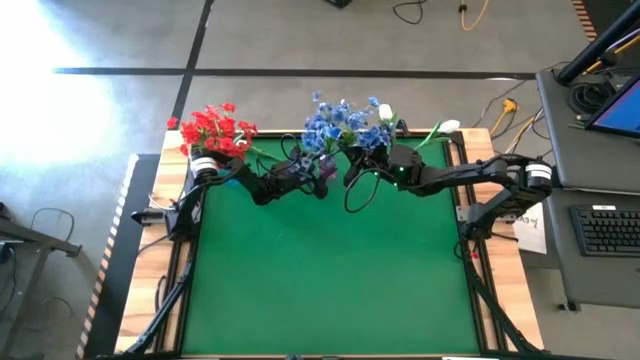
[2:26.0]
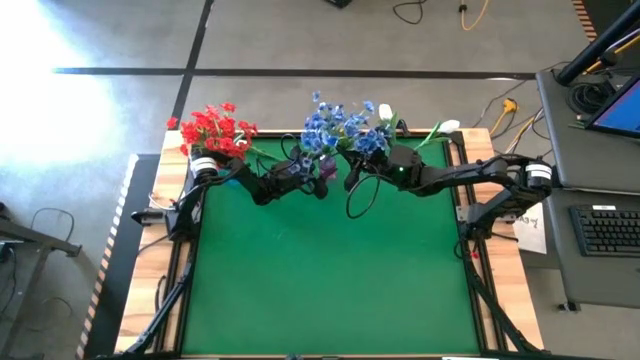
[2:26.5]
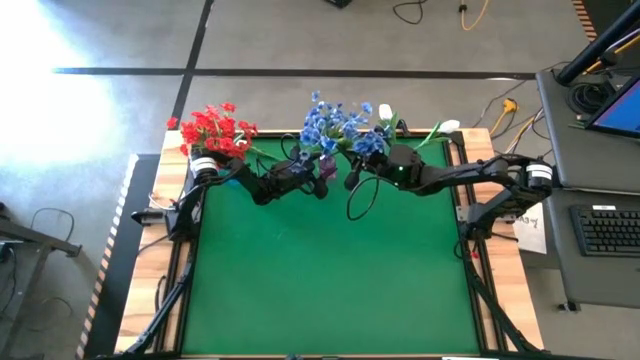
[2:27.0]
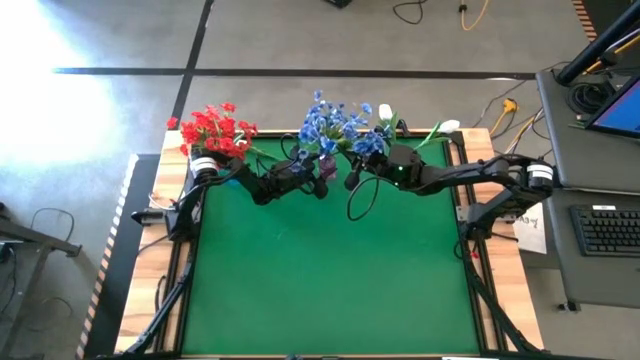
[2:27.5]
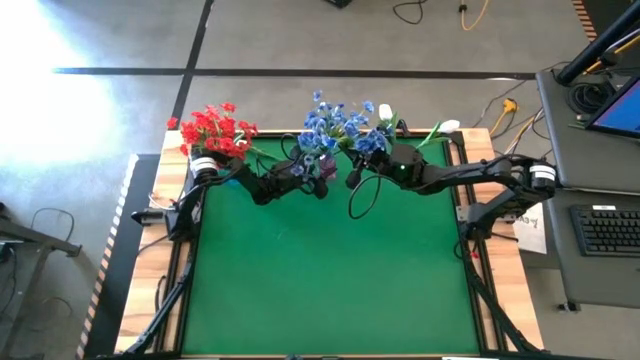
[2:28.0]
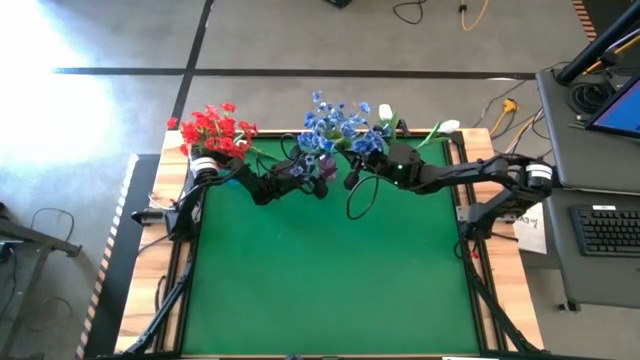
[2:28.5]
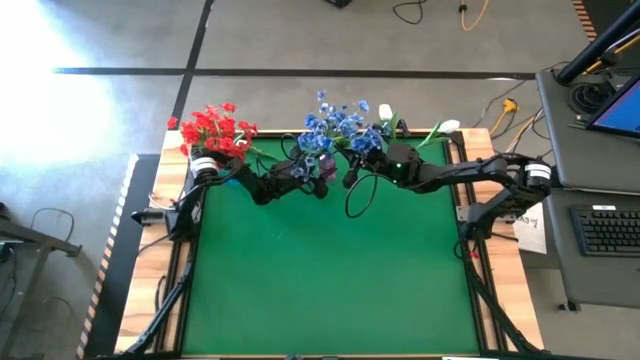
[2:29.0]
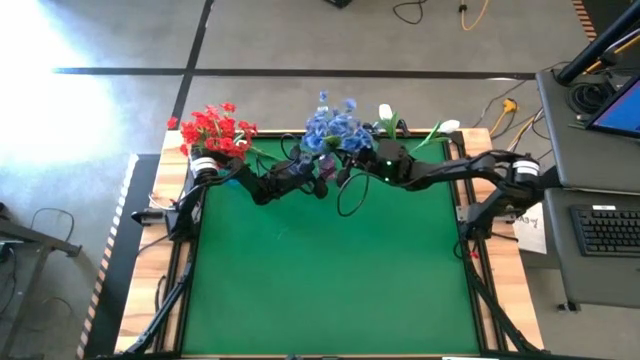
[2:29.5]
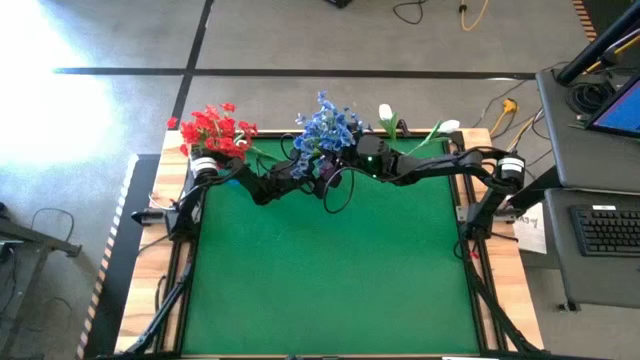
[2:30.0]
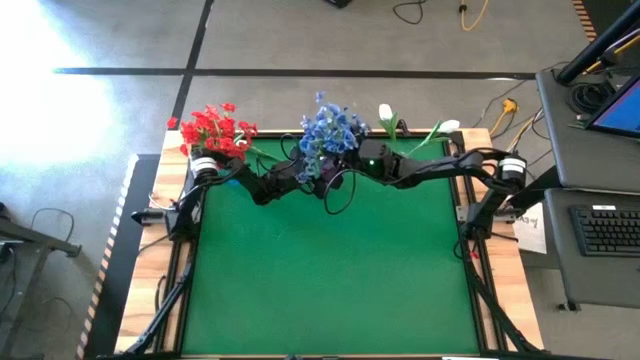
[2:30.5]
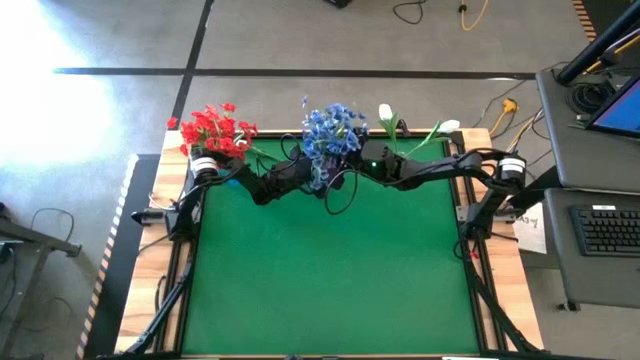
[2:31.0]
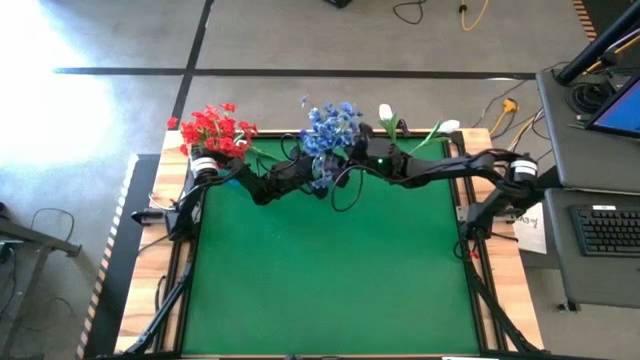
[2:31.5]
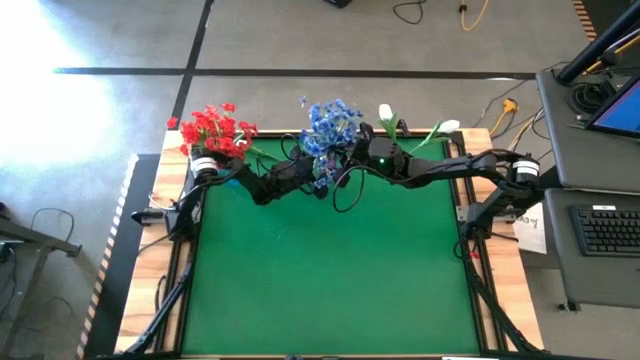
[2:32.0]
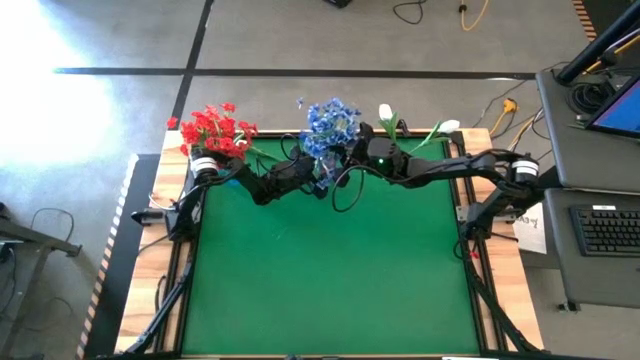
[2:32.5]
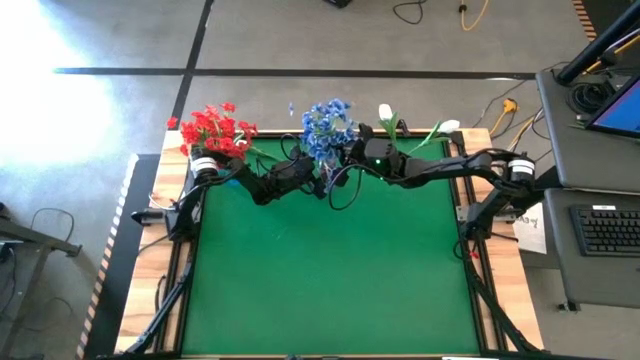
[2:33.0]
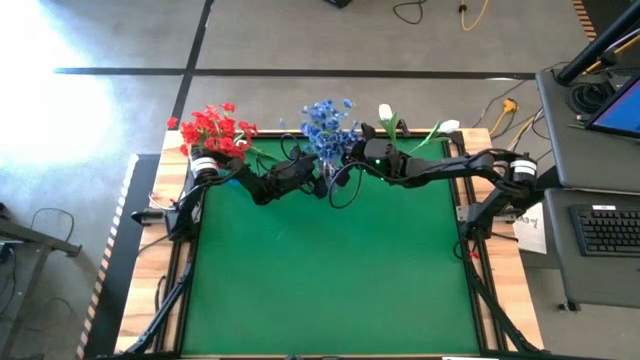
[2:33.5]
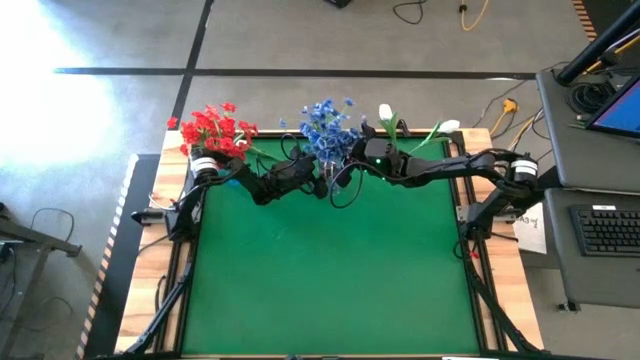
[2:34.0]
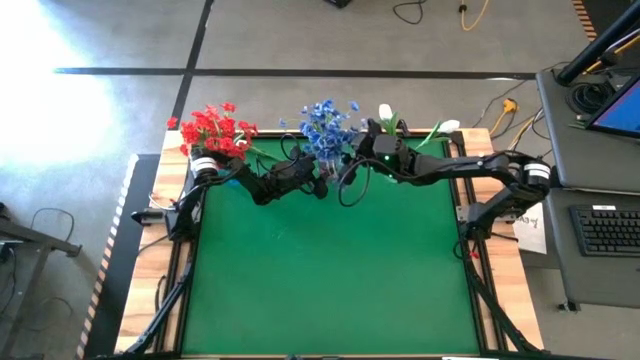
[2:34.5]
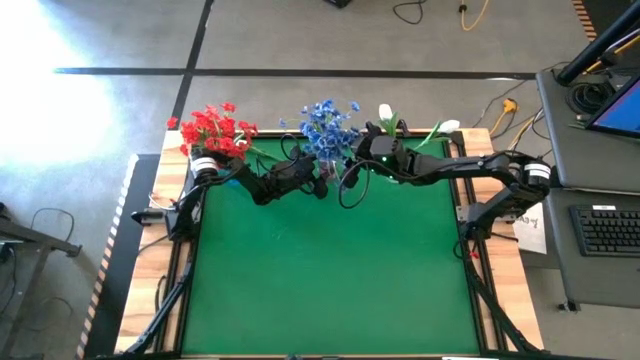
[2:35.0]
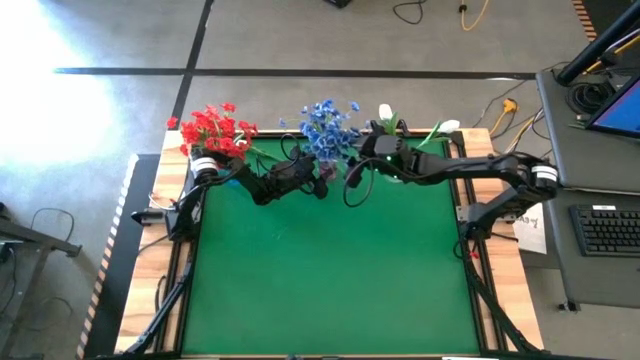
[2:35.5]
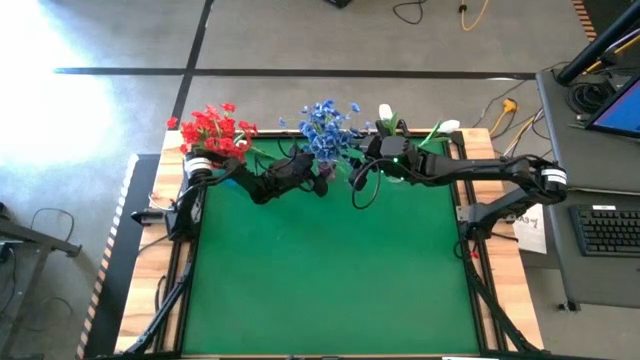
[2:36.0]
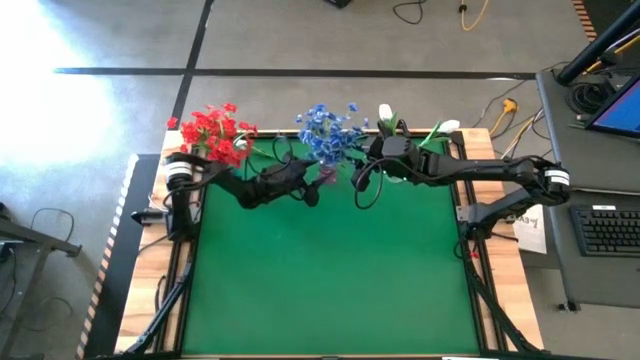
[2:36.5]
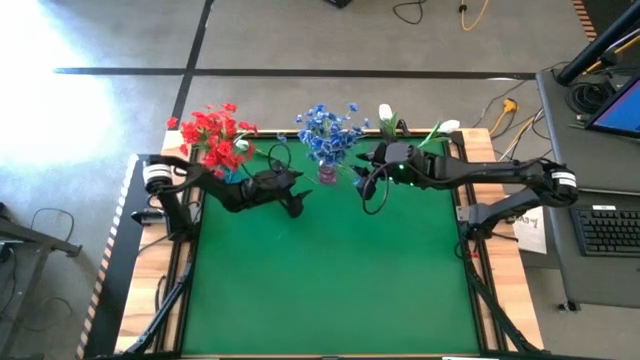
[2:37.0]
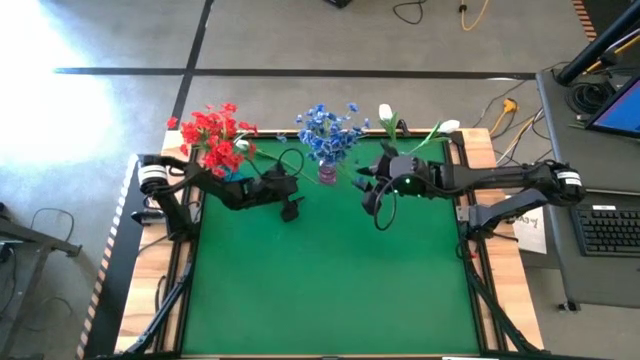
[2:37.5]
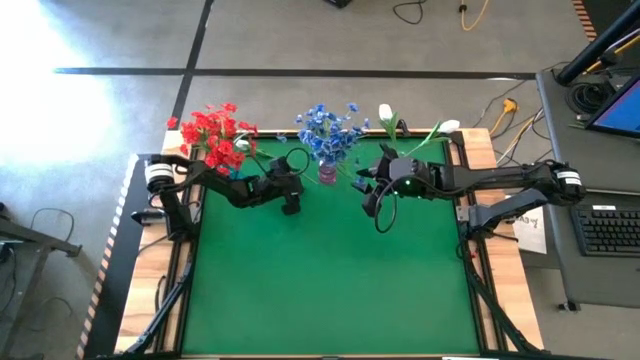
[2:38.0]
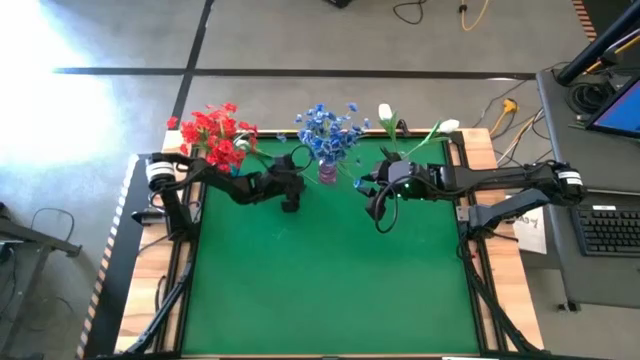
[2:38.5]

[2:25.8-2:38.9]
Task: Sort flowers into vase by color
Put the blue flowers into the purple vase

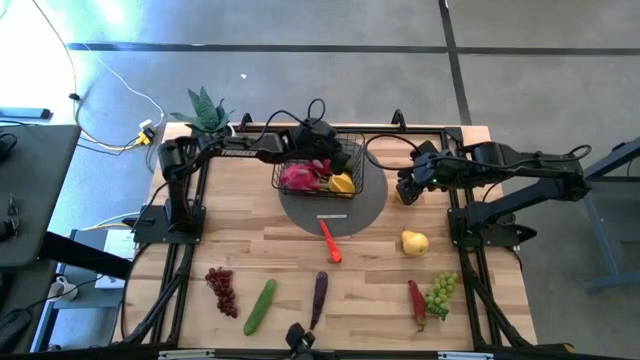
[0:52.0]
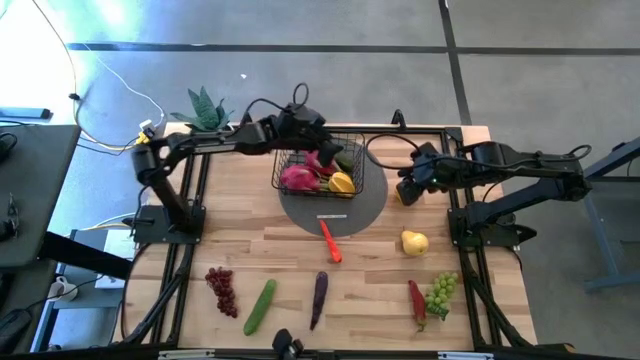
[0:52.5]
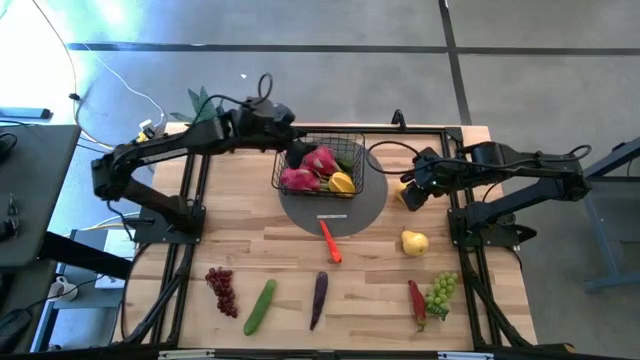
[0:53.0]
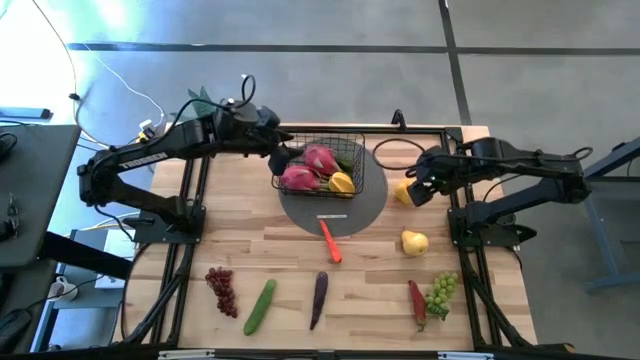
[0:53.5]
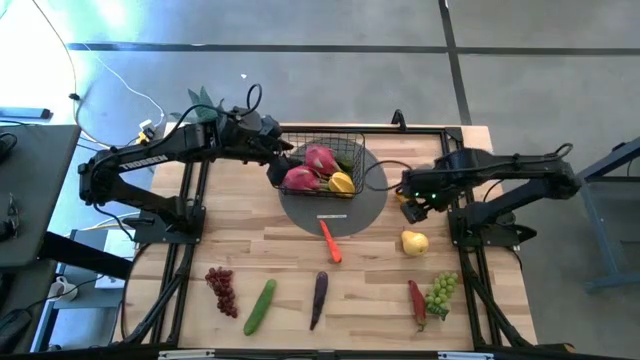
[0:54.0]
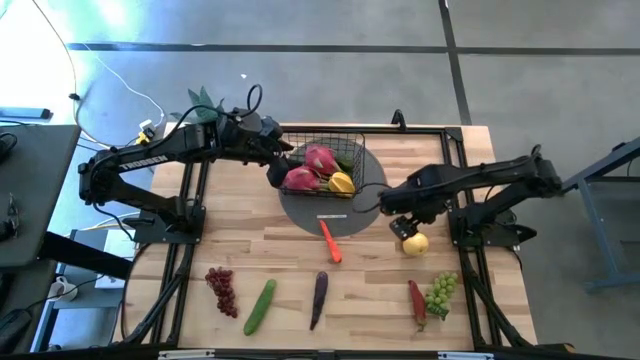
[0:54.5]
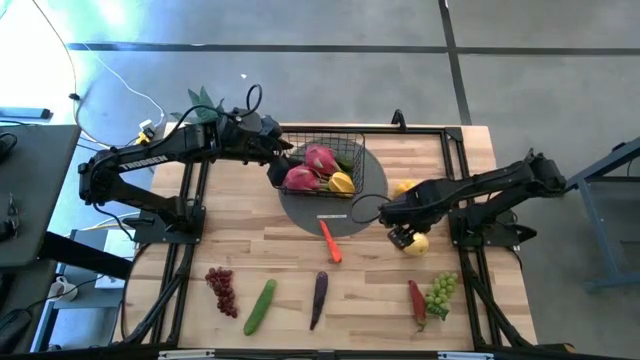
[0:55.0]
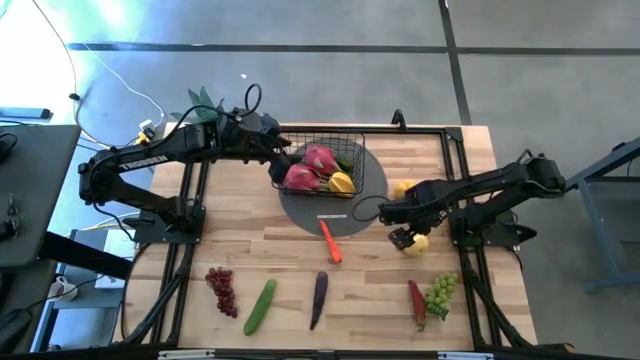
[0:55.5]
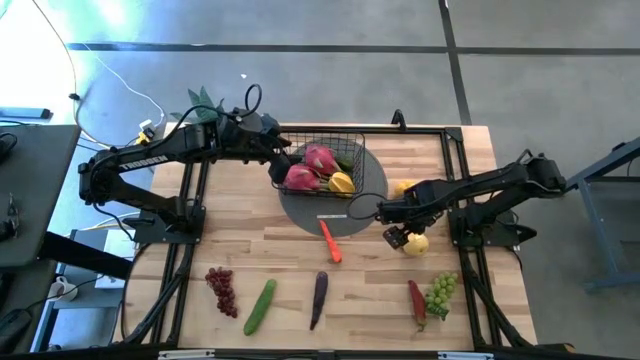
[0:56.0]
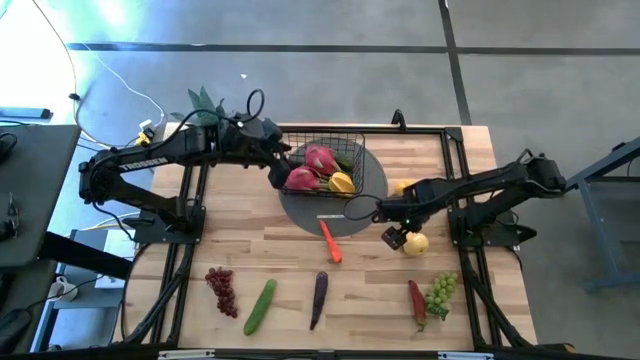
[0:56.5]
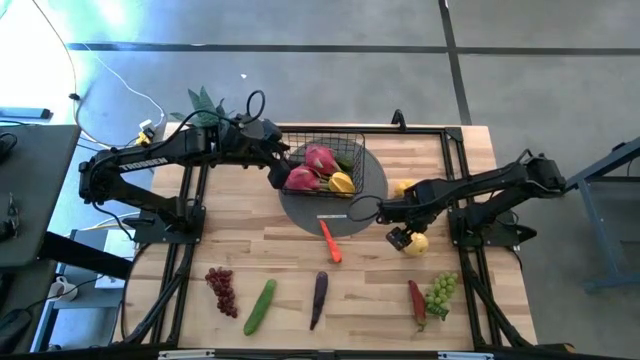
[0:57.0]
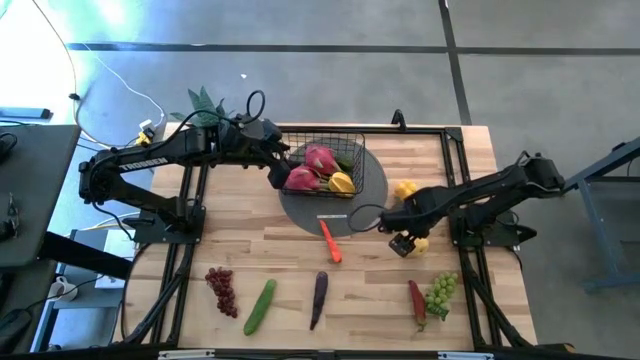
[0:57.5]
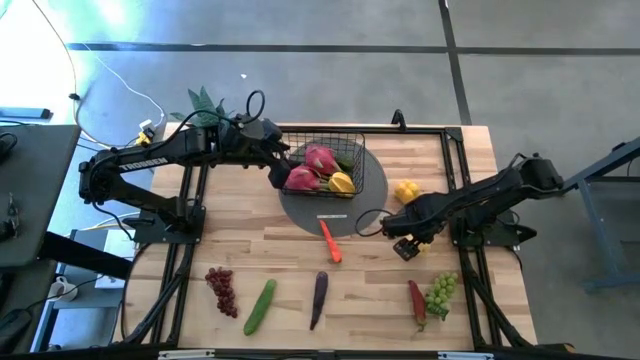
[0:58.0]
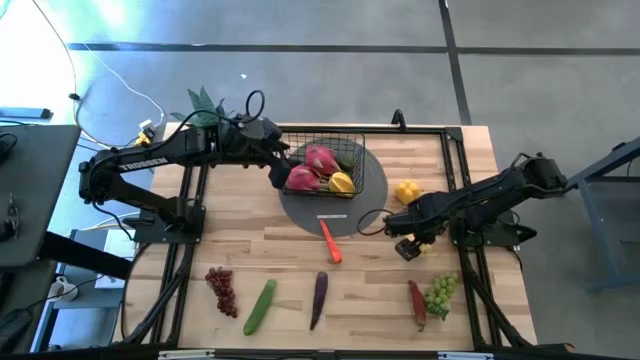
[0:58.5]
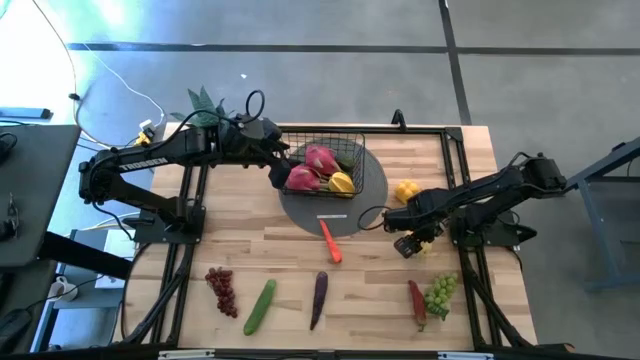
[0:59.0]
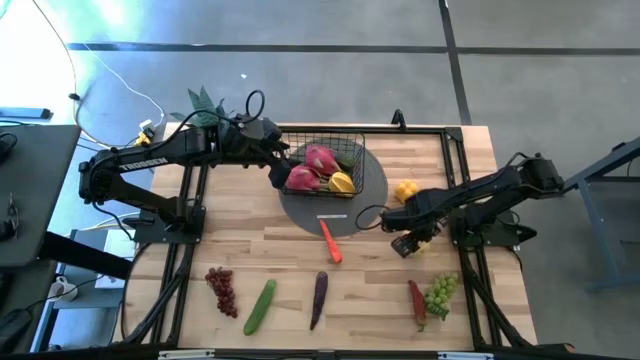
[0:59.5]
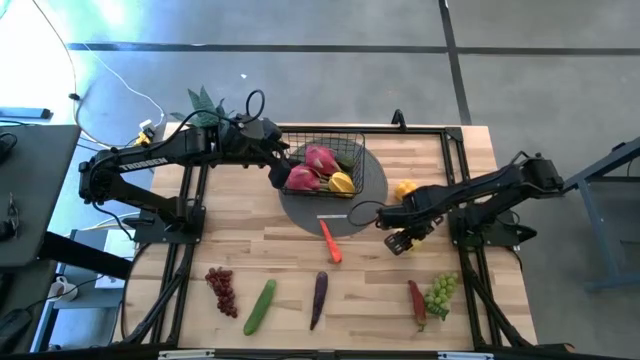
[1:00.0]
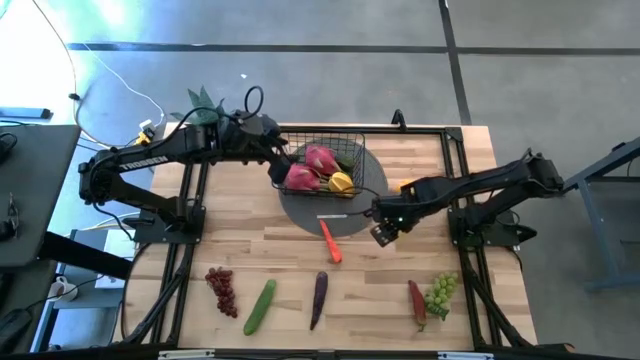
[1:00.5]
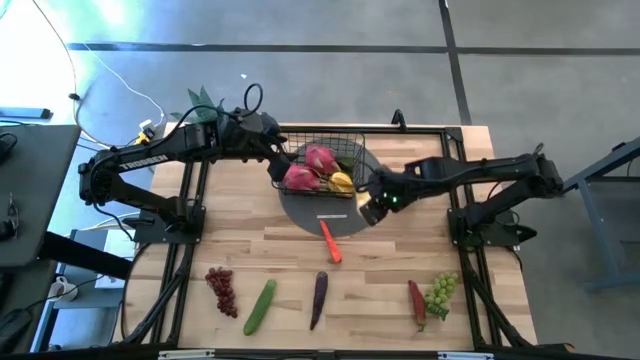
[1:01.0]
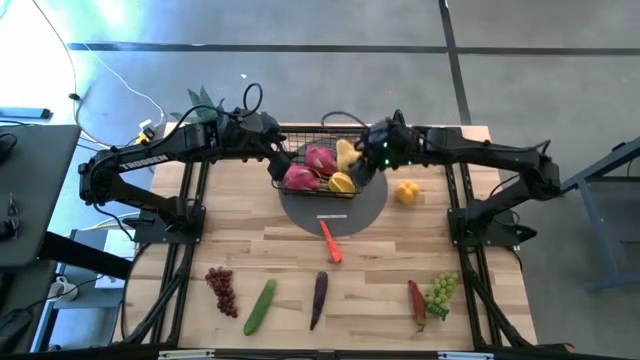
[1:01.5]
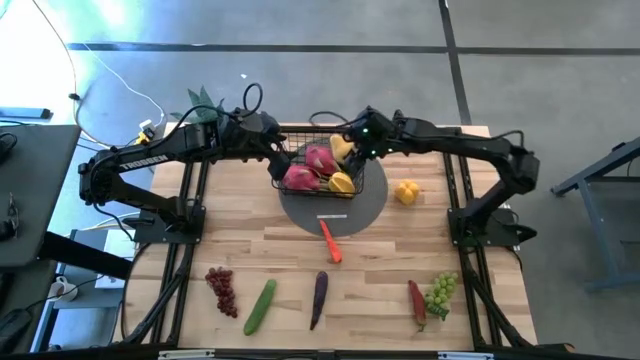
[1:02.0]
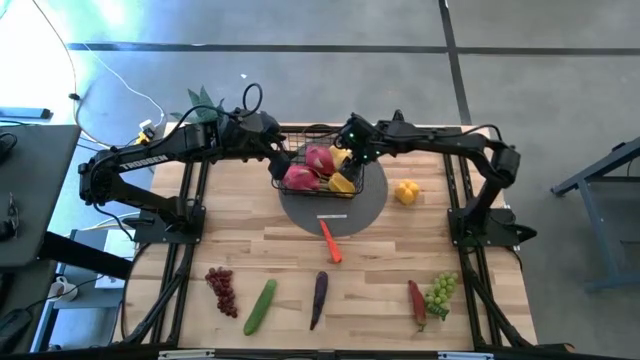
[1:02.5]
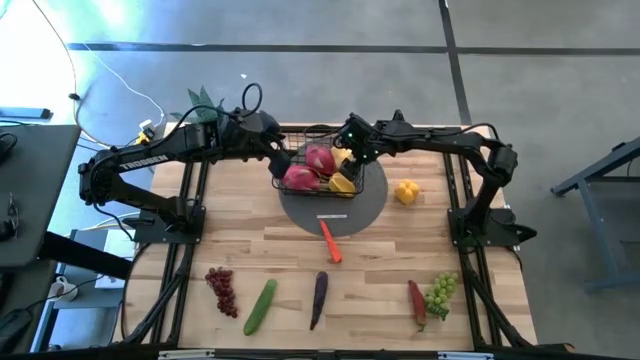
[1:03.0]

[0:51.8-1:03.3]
Task: Build produce basket
Put the yellow pear into the black wire basket
